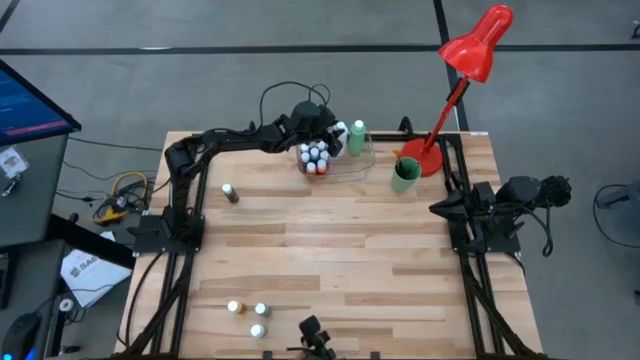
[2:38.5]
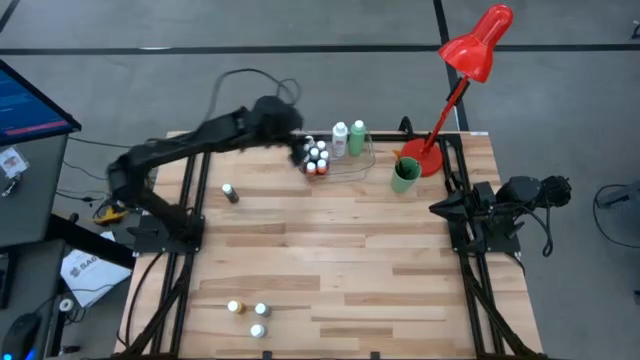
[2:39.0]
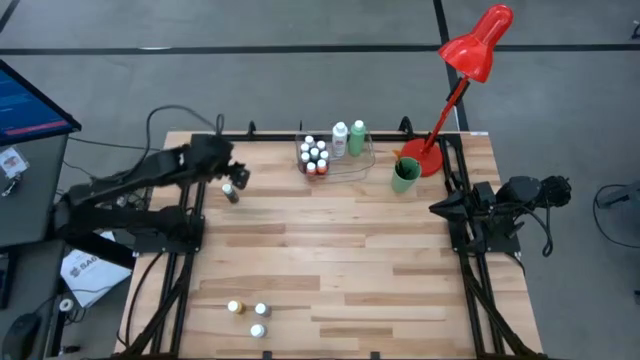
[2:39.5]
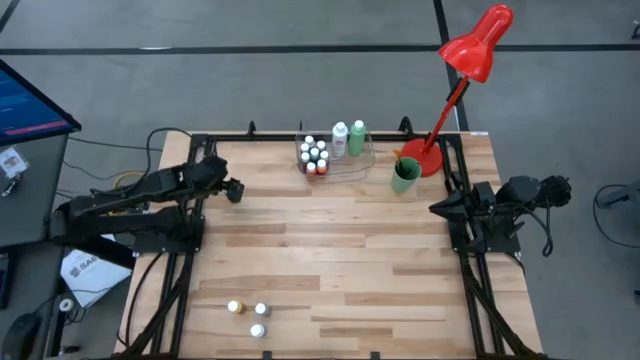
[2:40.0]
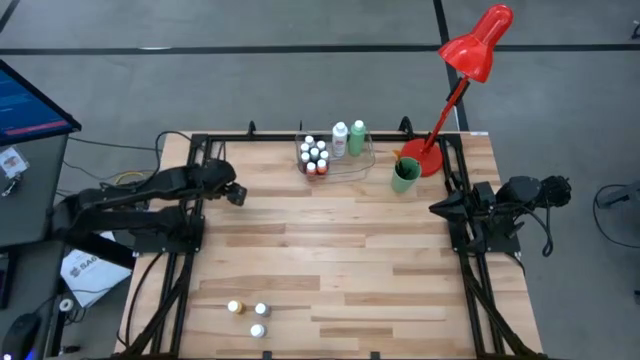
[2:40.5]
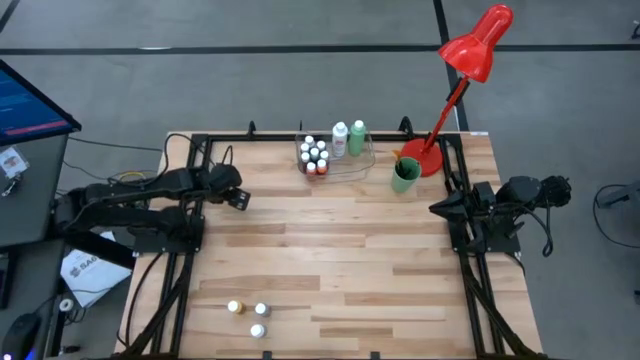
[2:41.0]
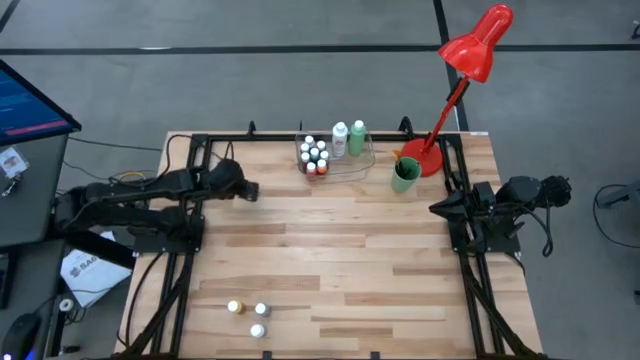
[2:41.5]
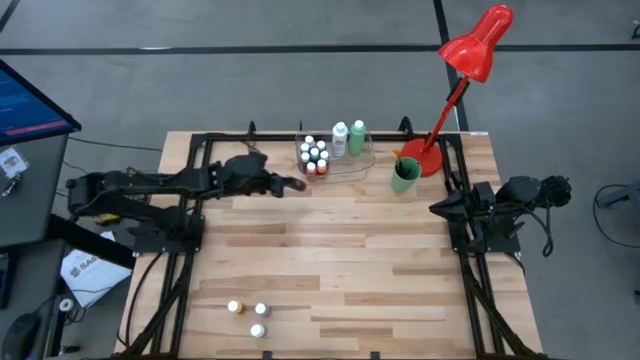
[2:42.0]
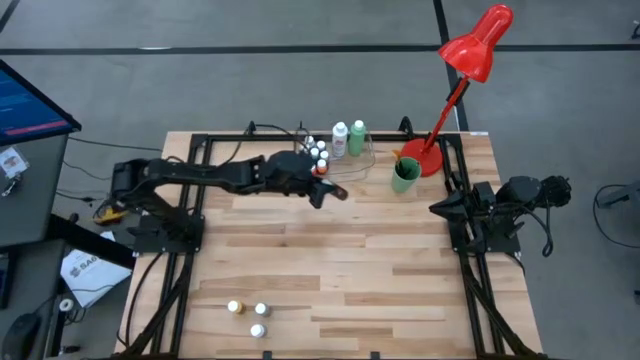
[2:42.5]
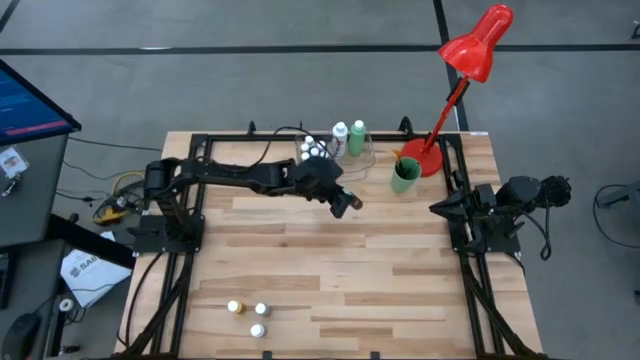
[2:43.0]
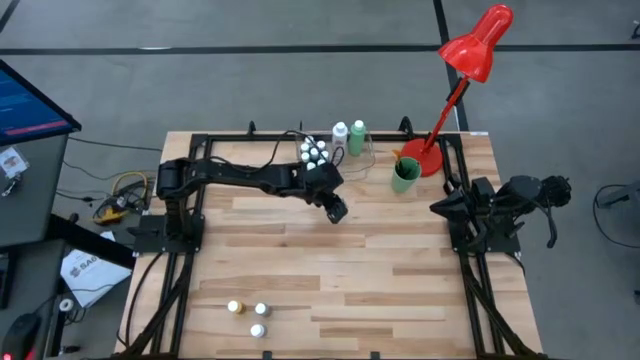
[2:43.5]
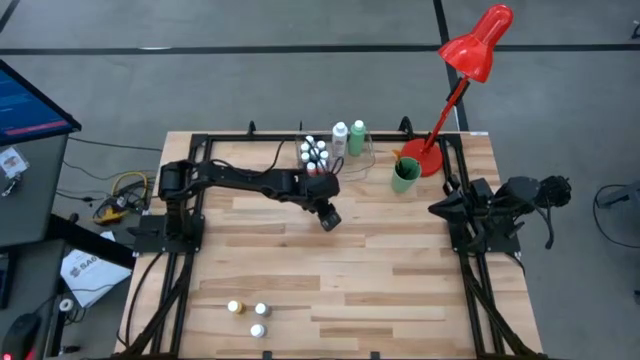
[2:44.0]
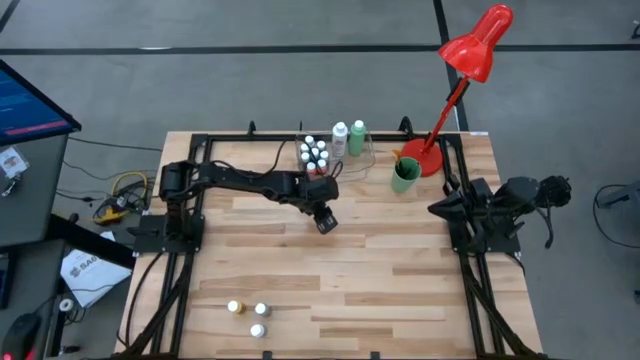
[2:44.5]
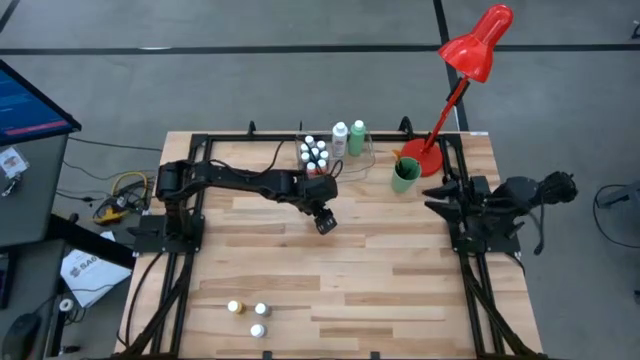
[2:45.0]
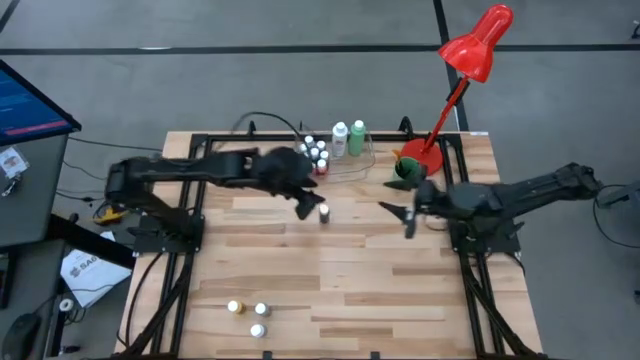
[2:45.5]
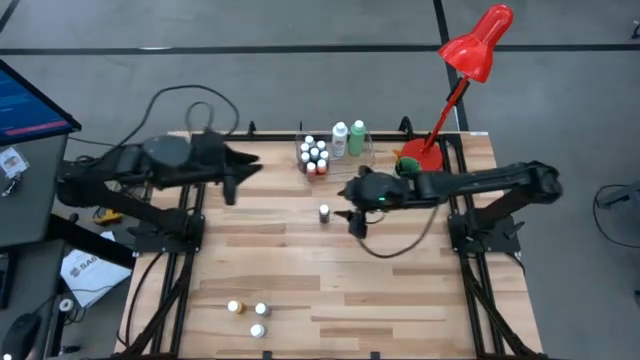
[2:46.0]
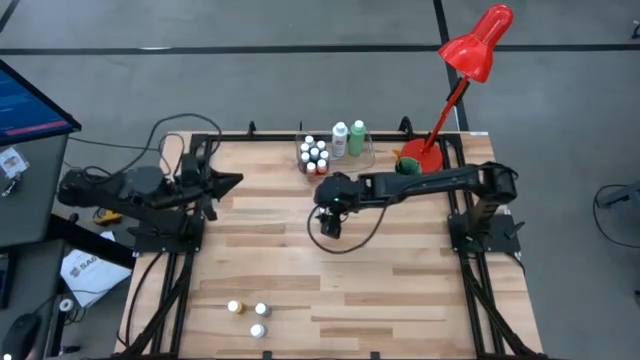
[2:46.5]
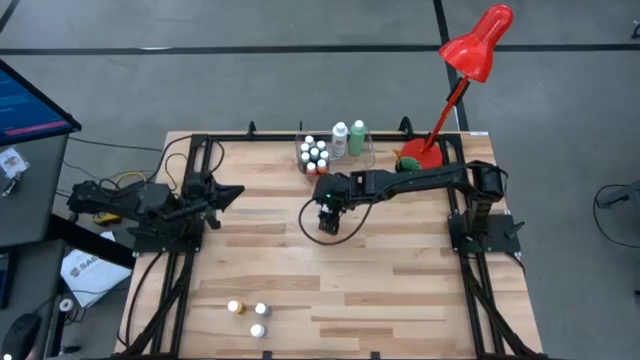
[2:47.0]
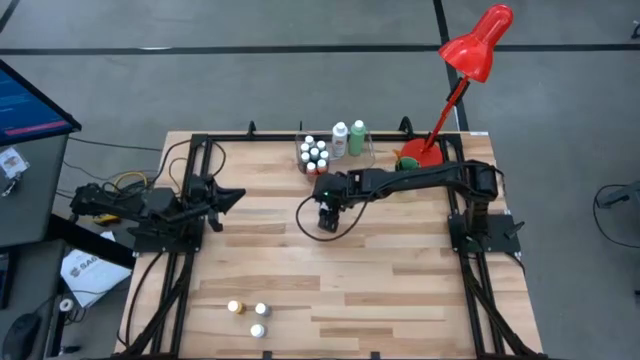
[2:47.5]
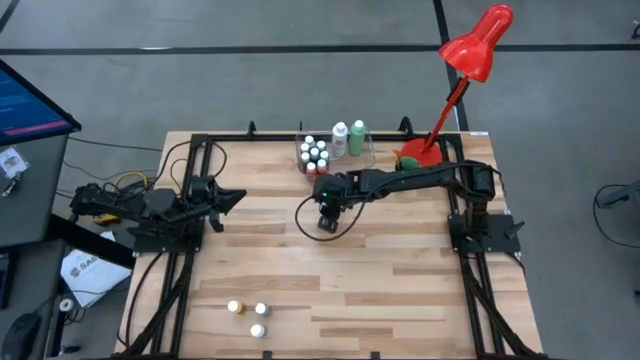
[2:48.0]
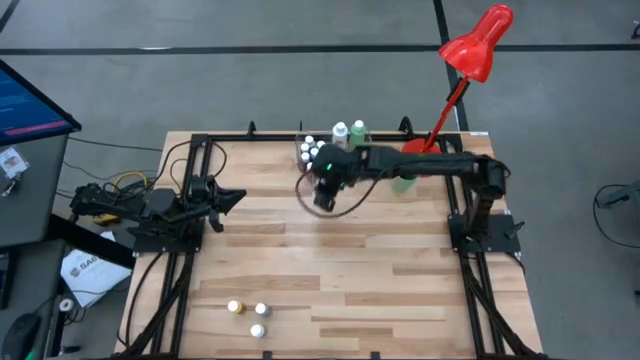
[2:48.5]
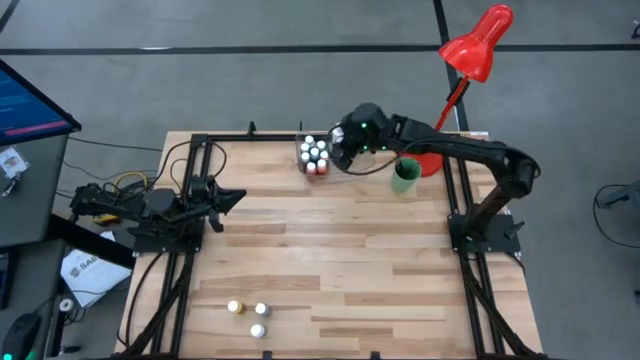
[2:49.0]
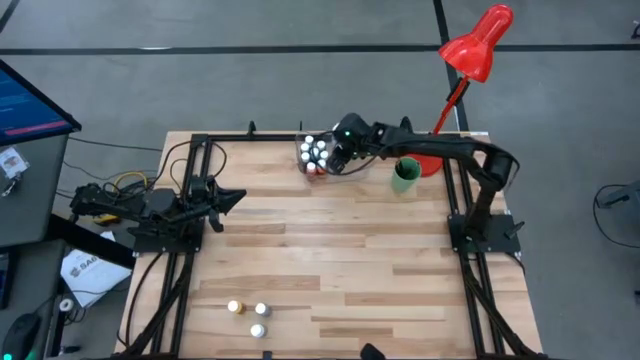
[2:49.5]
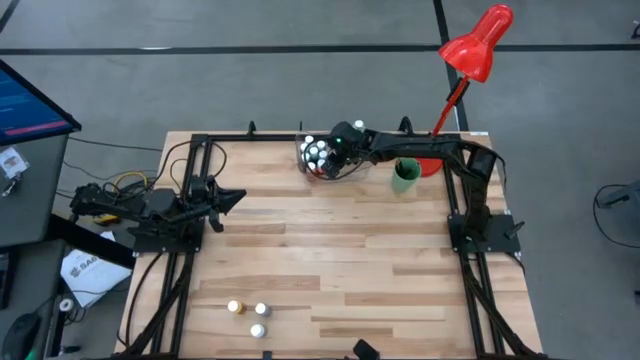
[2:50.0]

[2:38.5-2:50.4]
Task: Pick & Place Paint Supplies
Put the small dark green paint bottle into the transparent bin

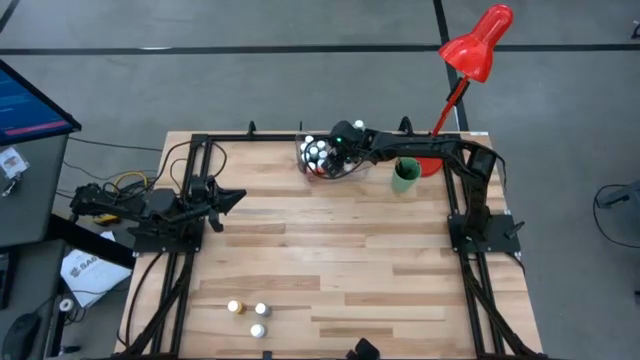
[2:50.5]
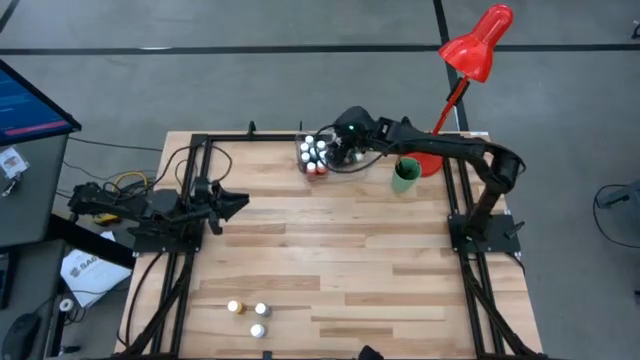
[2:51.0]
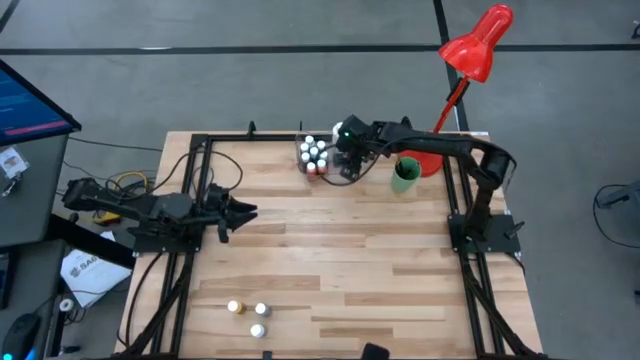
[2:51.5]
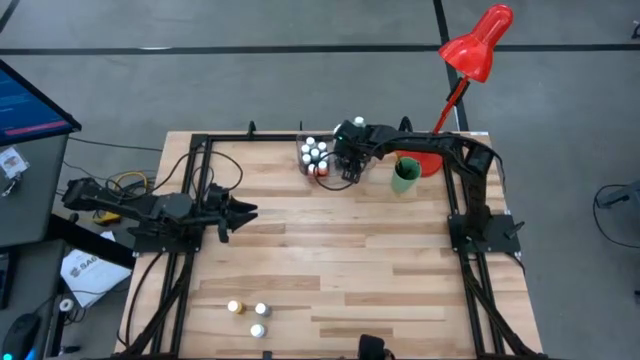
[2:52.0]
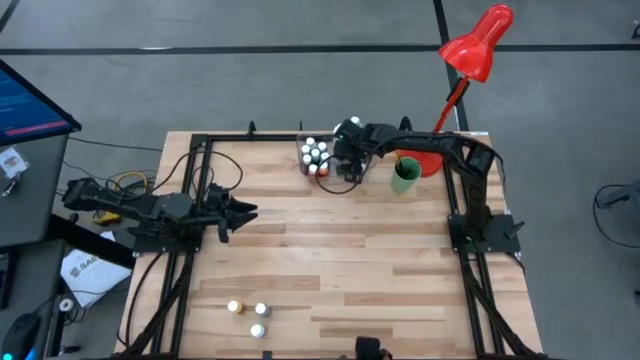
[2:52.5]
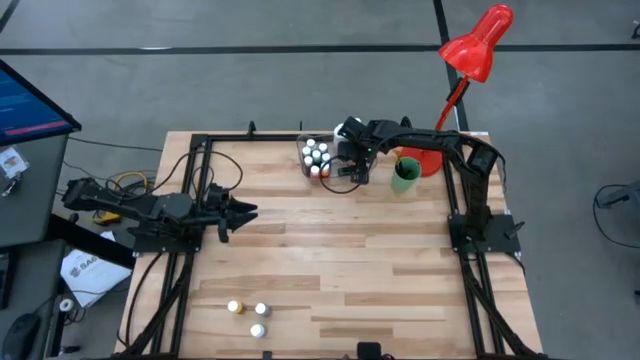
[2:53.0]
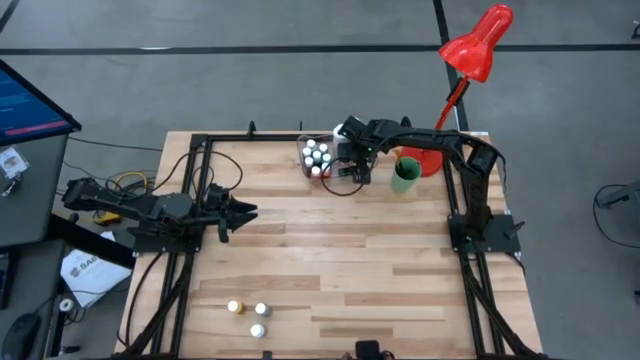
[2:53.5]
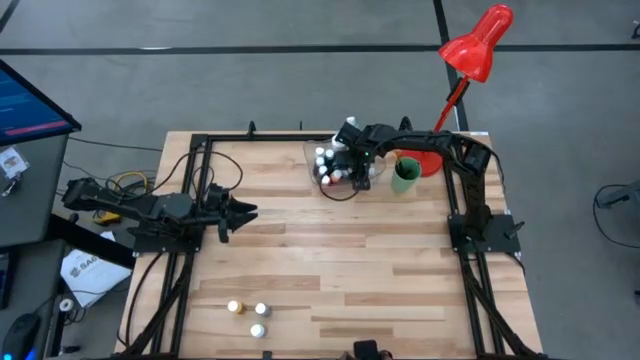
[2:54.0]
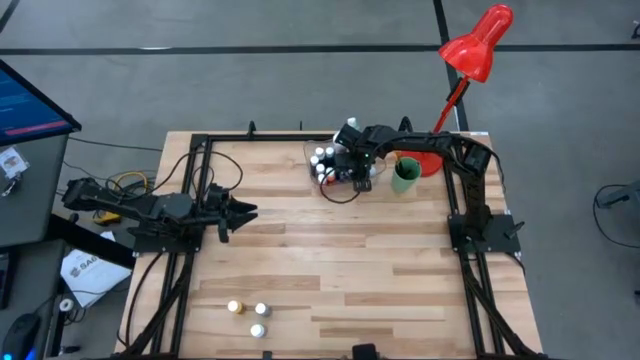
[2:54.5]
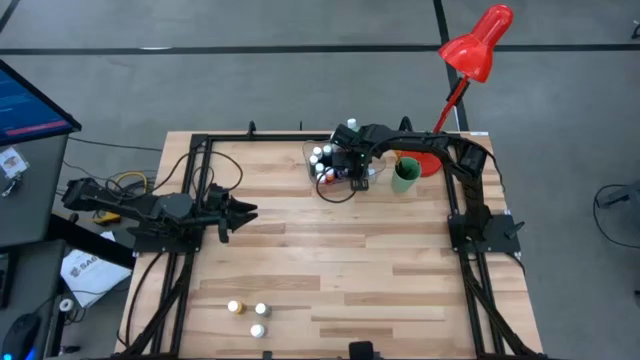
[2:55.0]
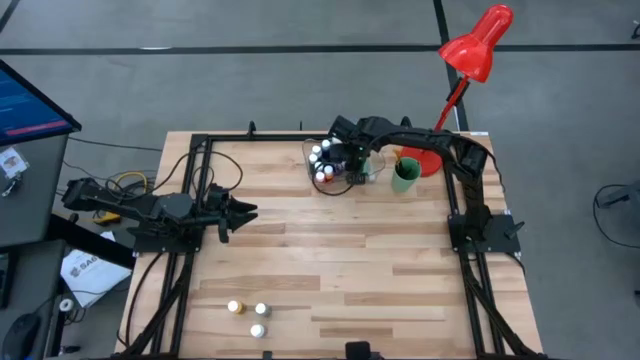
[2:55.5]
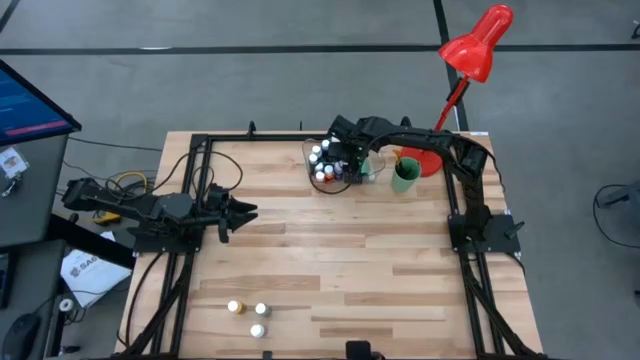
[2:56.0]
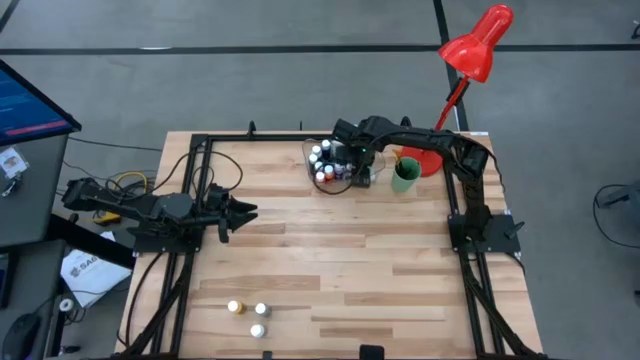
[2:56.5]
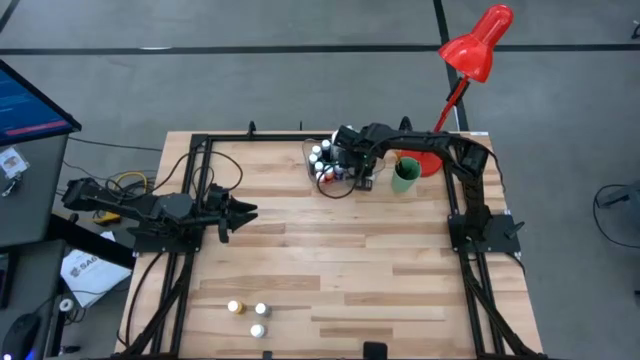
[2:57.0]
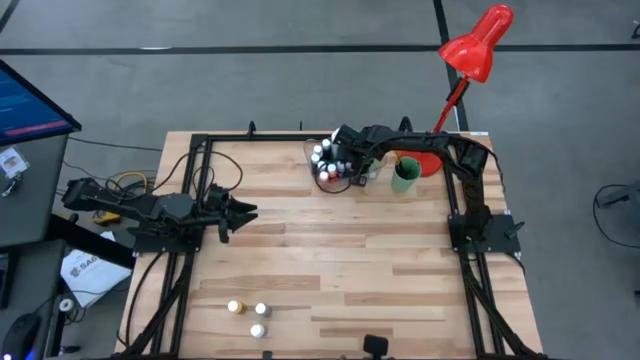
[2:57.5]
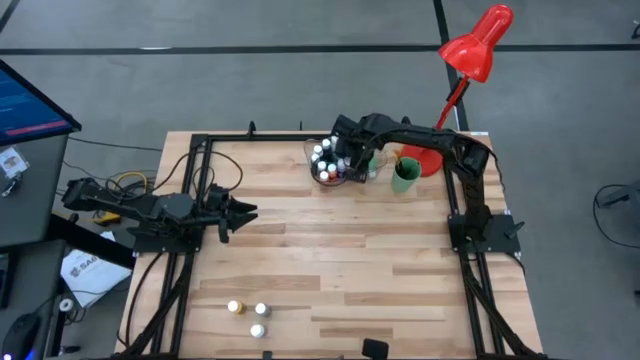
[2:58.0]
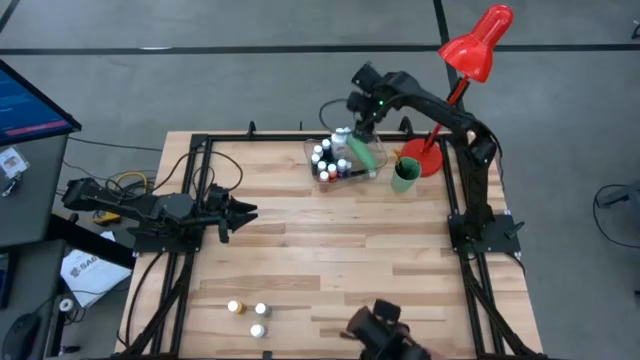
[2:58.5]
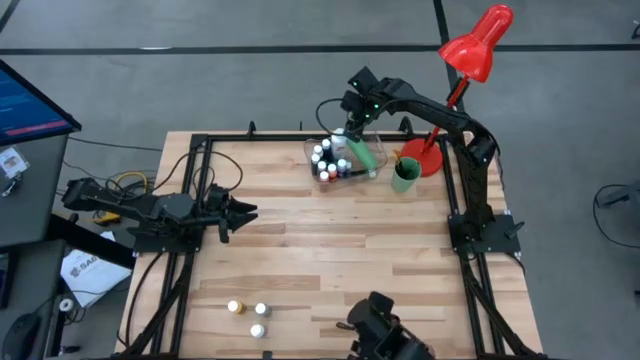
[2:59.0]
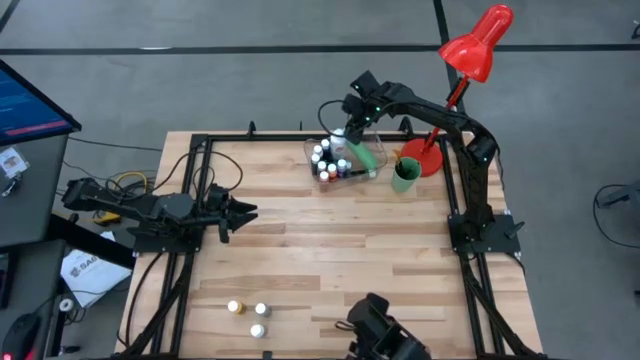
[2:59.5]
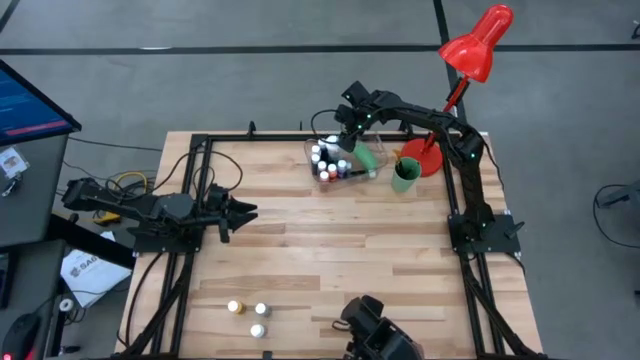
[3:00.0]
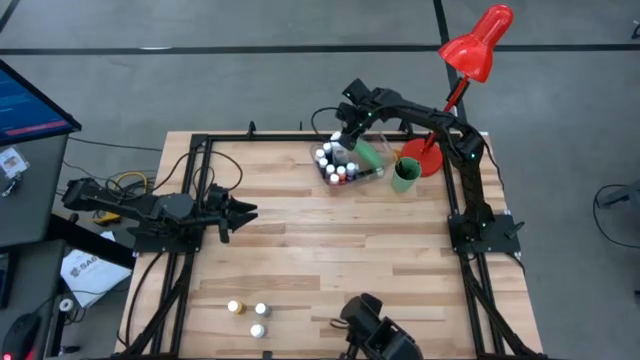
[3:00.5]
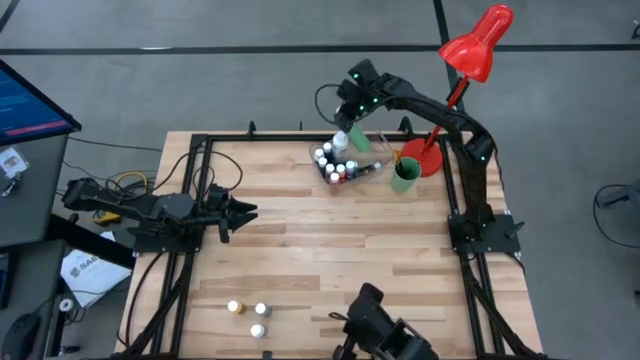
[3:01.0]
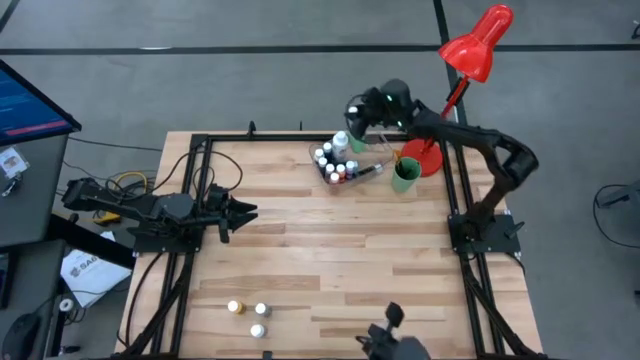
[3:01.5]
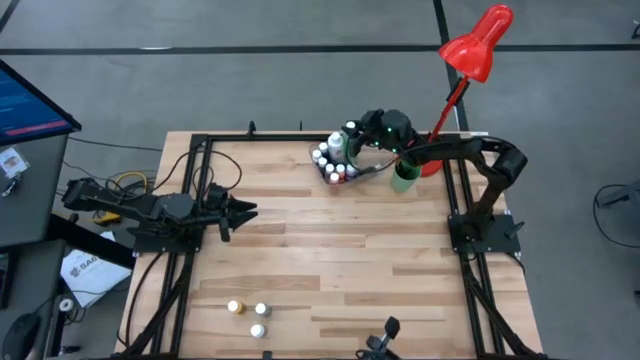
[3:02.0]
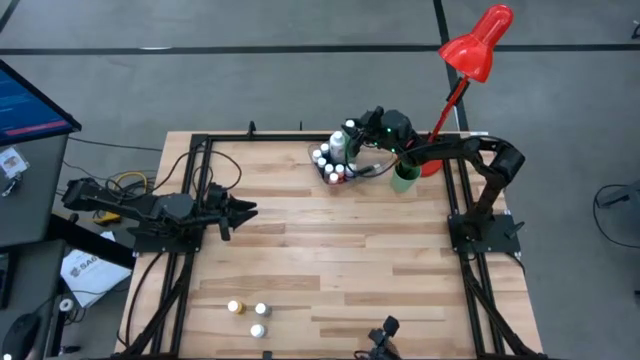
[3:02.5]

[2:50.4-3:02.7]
Adjust the paint bottles in the transparent bin
